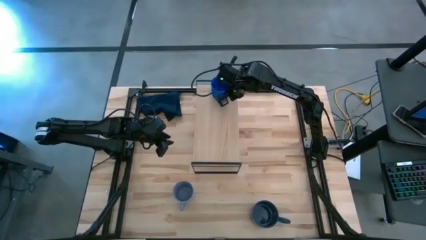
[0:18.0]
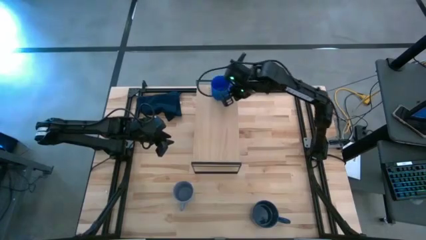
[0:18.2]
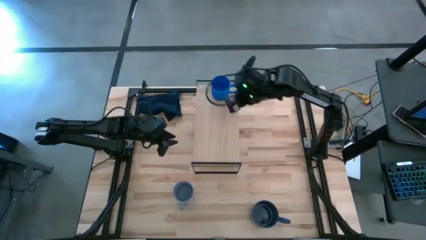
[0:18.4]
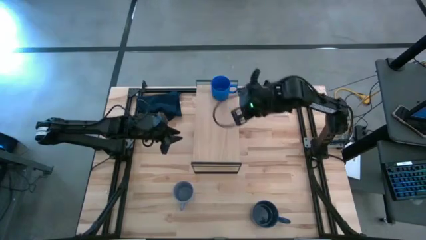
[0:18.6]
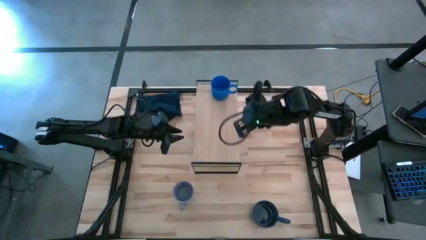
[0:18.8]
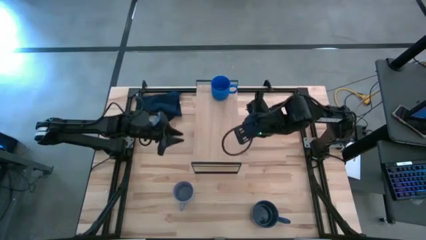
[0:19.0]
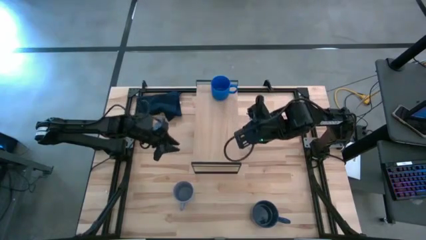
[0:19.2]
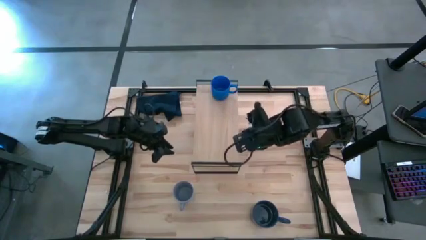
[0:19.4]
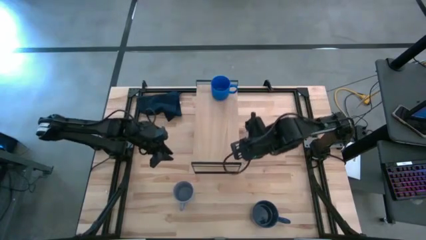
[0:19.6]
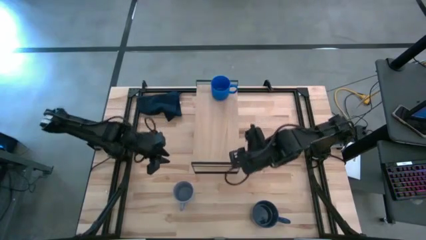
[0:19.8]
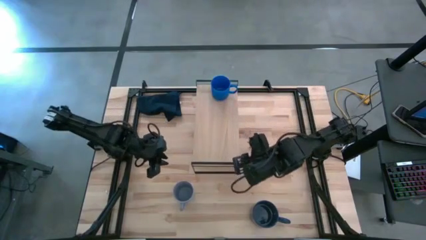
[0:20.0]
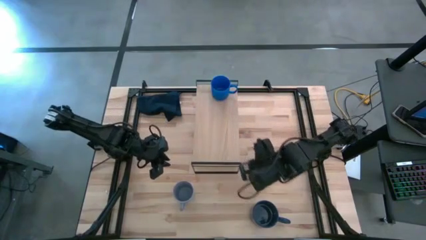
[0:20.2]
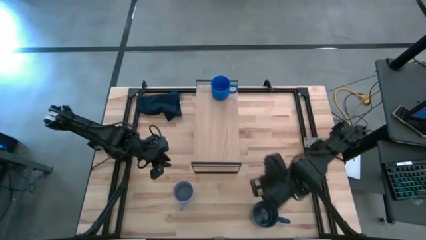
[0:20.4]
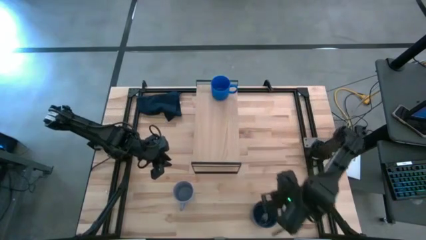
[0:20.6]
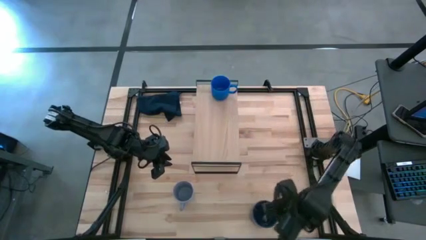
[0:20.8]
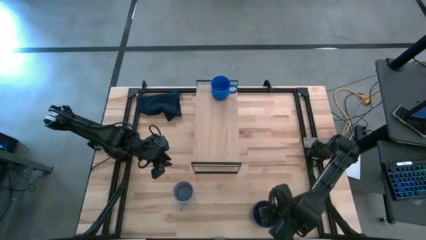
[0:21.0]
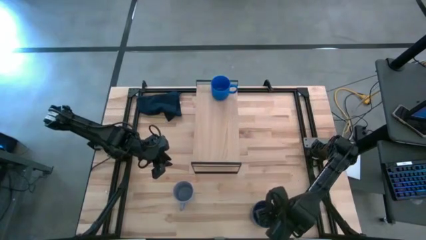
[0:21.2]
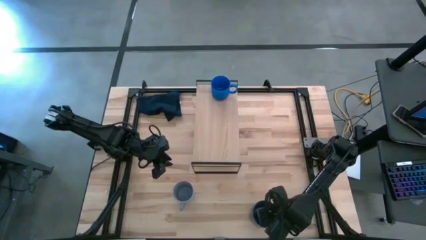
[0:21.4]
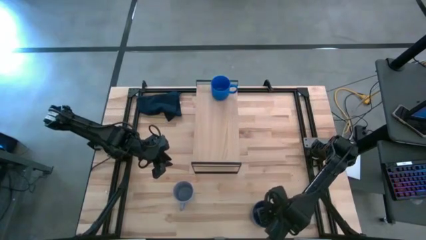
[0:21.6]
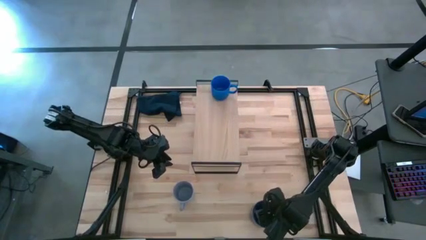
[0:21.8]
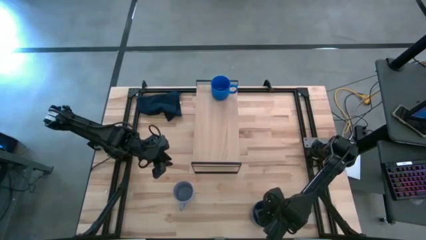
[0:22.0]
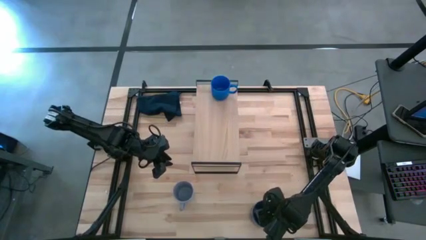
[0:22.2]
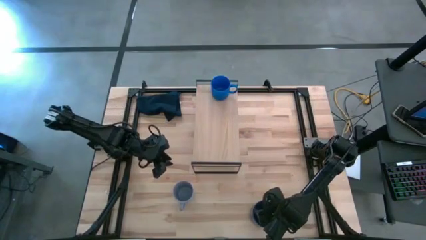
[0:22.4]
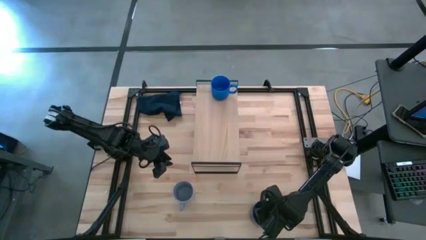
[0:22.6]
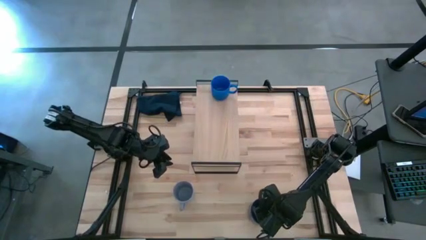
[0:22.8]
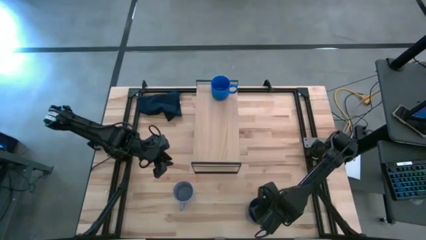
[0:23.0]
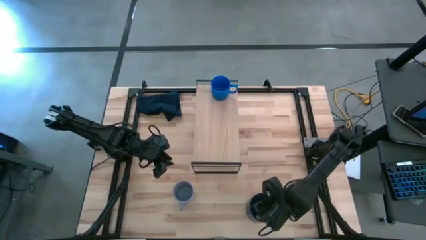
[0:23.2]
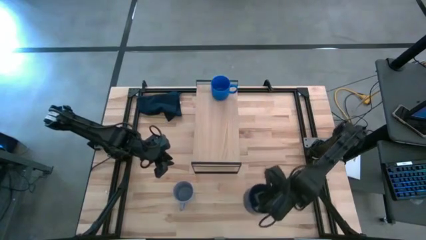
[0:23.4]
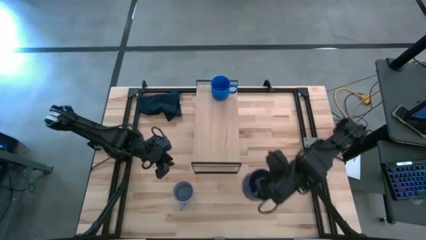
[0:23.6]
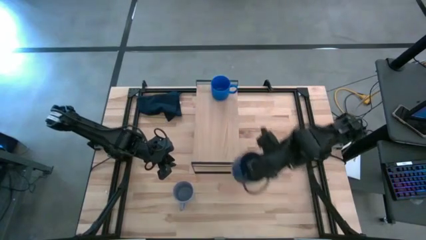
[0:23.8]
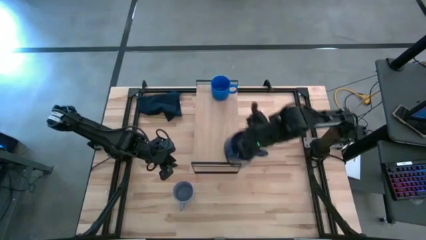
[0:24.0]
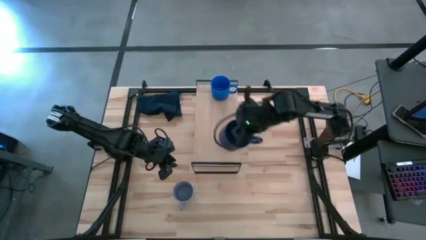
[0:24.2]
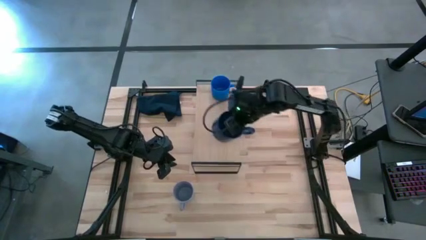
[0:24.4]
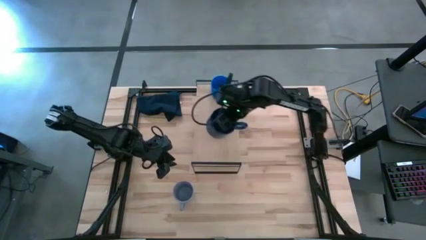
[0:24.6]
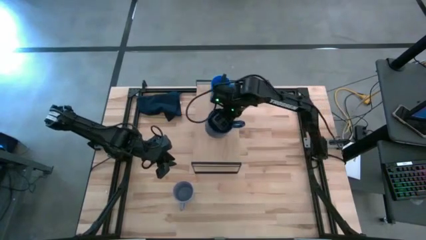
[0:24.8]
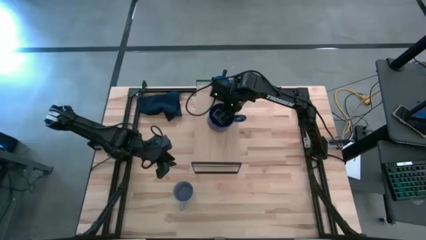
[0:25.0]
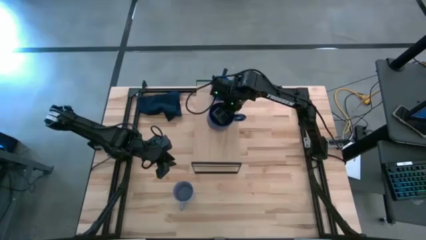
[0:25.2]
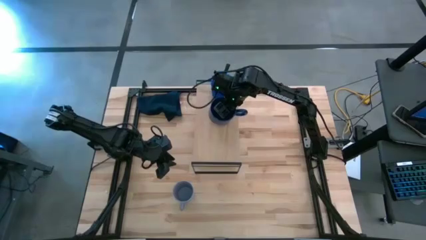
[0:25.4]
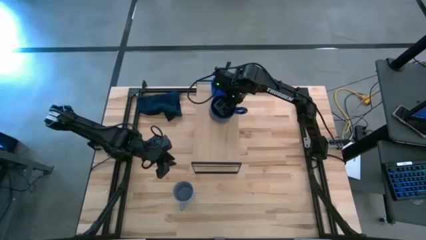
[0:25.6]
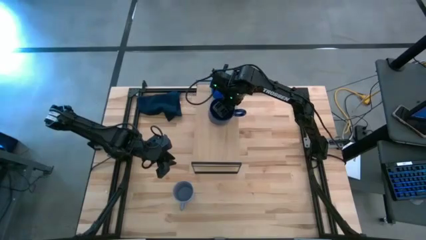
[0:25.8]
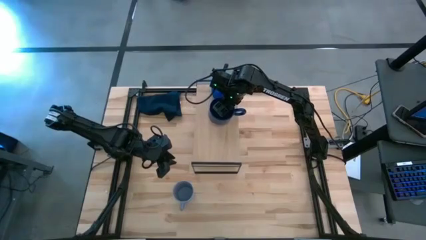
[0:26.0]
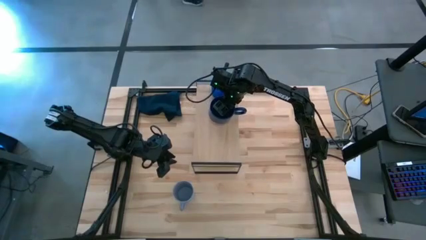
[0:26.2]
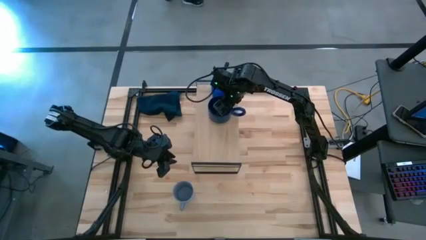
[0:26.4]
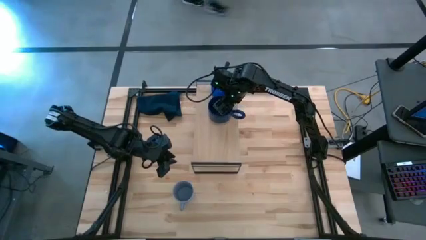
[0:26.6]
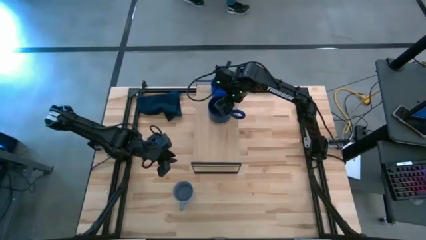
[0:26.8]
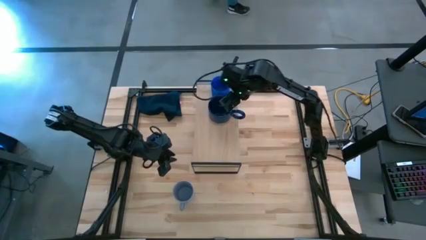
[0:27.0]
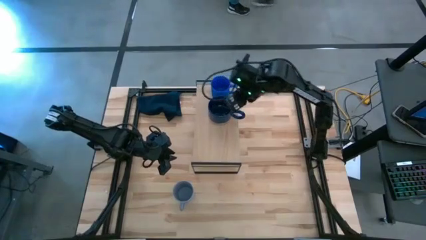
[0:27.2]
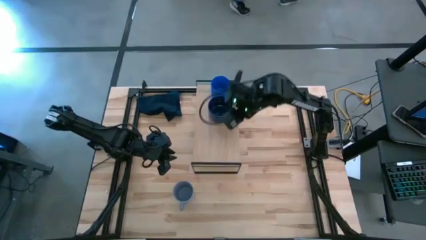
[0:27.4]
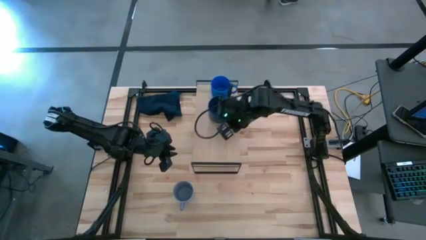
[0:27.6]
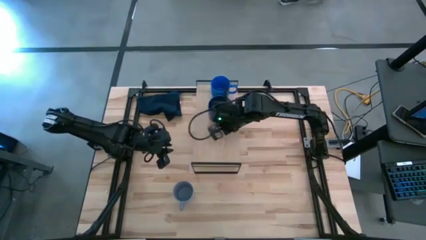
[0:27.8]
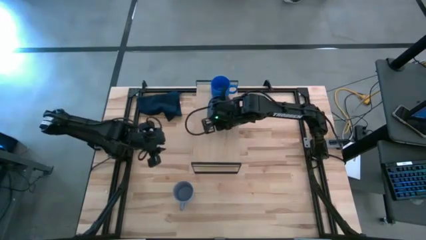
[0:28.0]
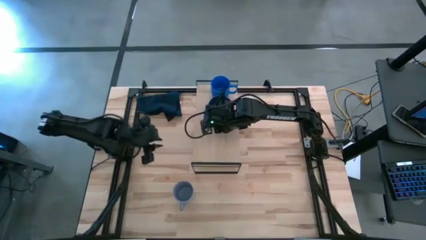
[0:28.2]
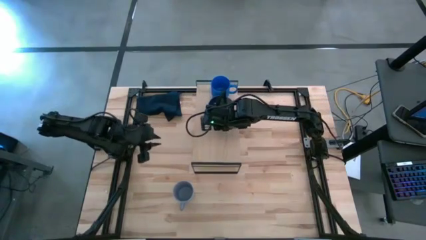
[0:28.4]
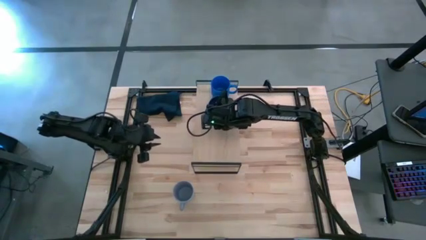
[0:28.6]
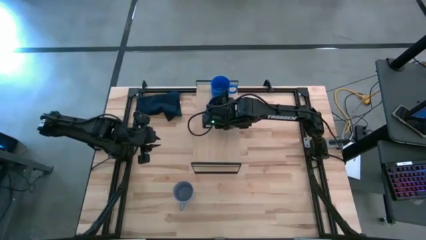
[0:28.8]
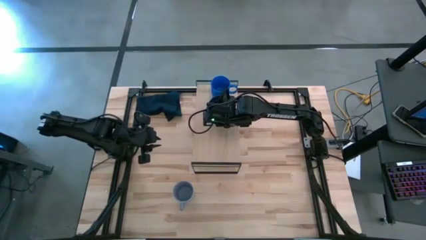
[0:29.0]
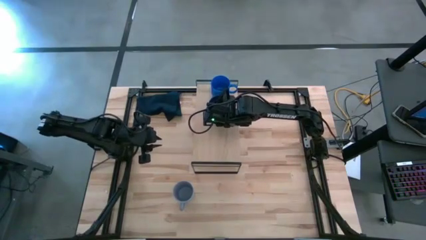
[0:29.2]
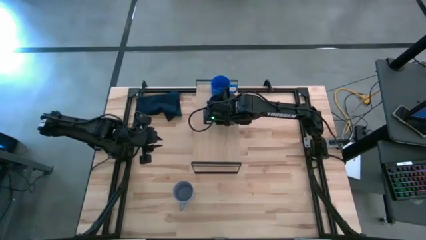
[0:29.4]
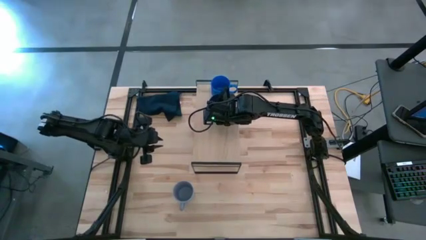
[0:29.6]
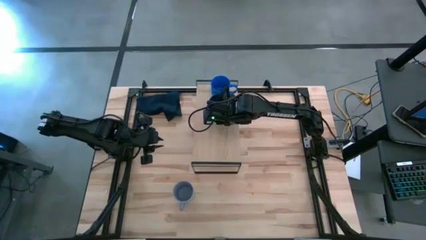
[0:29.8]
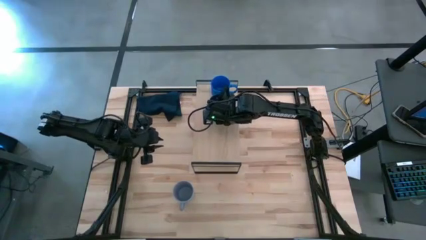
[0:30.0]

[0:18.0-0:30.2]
Task: Stack small to large cups/mugs on shelf
Put the blue mug on the shelf

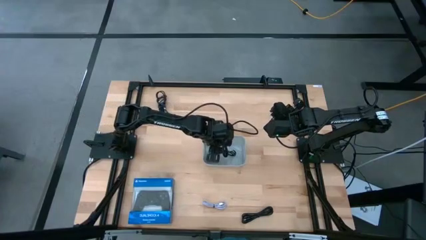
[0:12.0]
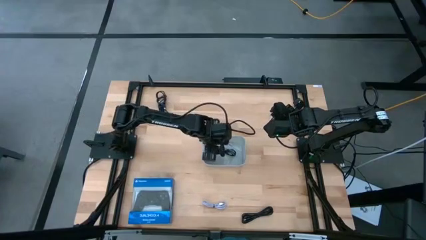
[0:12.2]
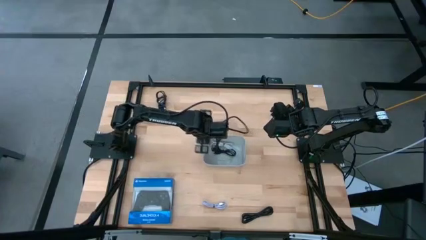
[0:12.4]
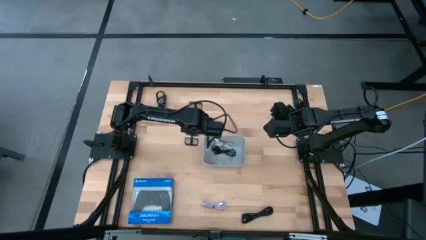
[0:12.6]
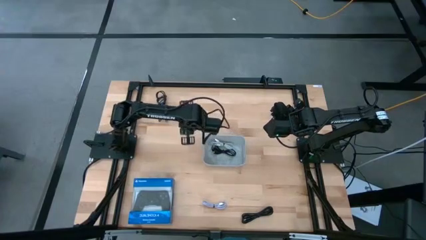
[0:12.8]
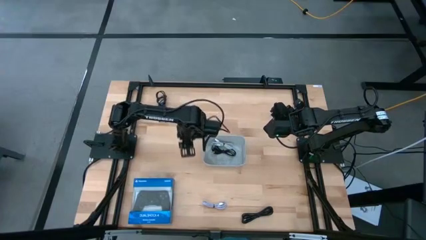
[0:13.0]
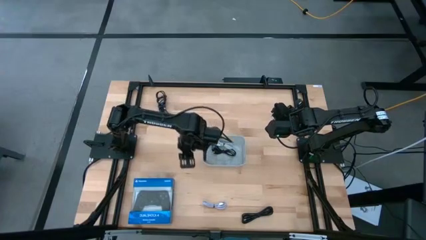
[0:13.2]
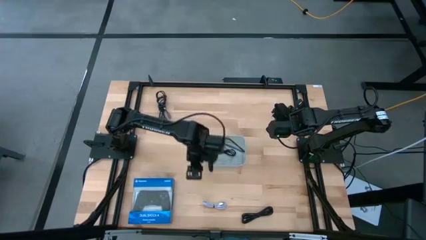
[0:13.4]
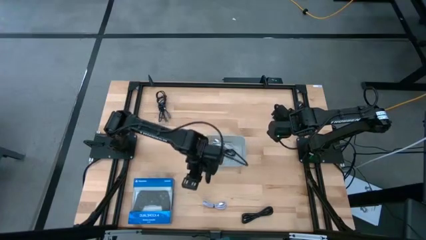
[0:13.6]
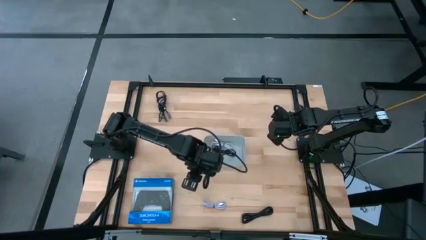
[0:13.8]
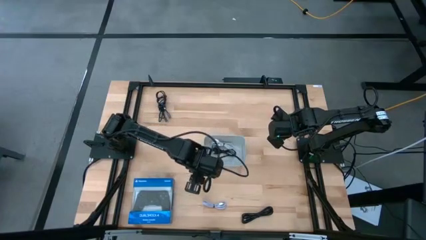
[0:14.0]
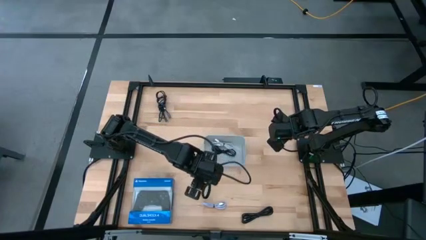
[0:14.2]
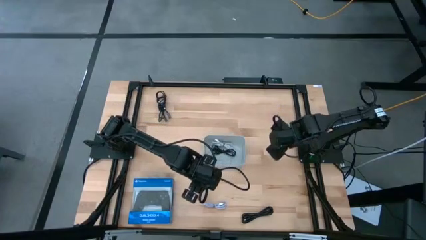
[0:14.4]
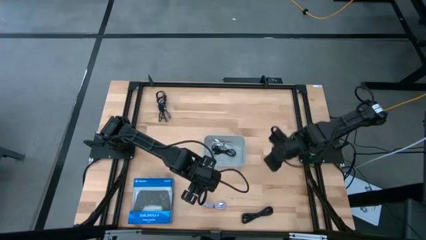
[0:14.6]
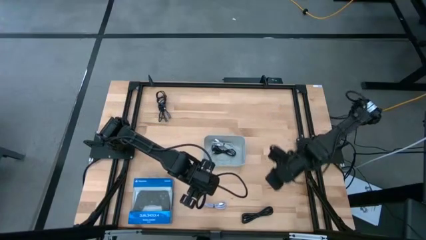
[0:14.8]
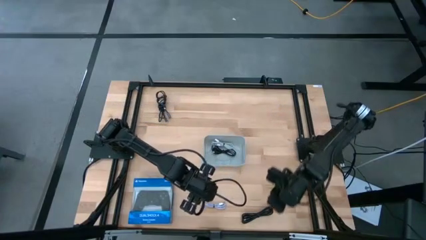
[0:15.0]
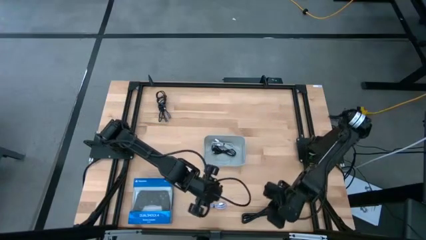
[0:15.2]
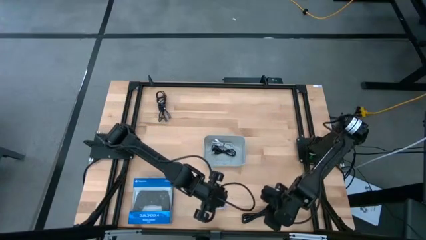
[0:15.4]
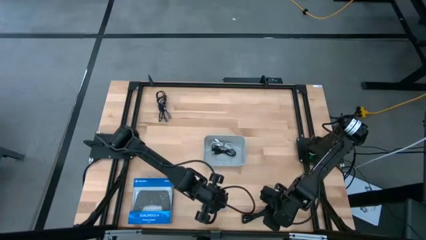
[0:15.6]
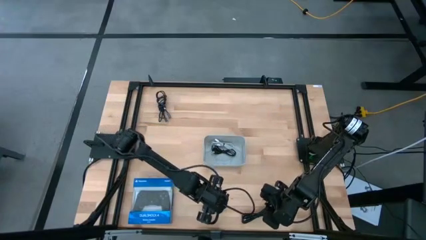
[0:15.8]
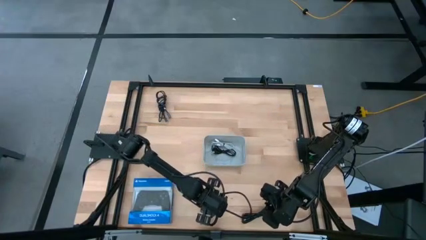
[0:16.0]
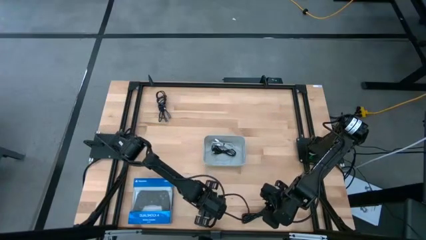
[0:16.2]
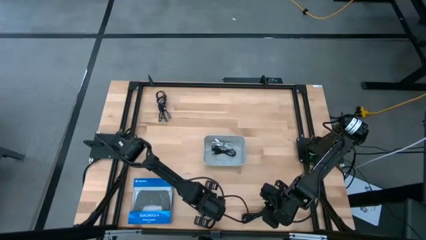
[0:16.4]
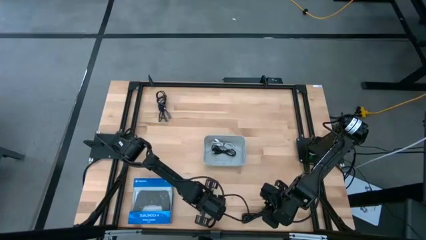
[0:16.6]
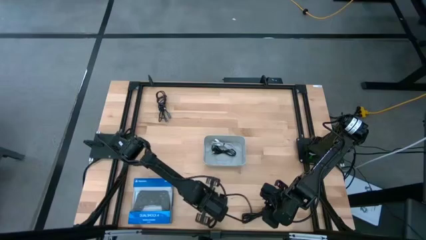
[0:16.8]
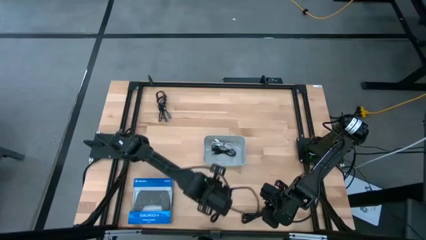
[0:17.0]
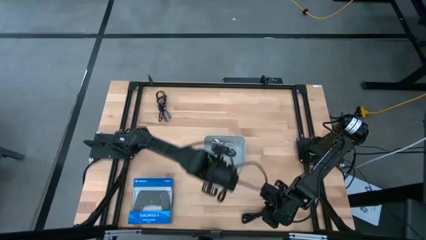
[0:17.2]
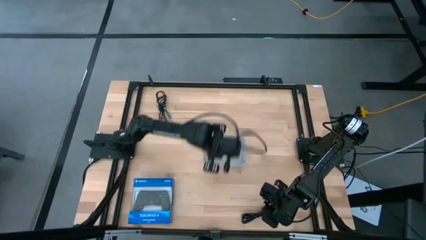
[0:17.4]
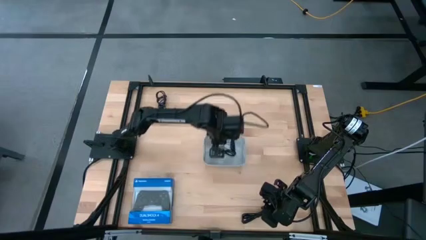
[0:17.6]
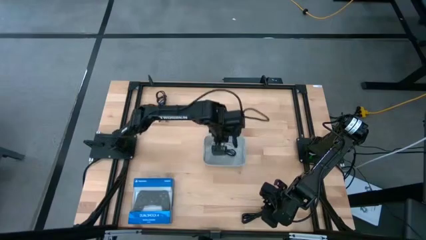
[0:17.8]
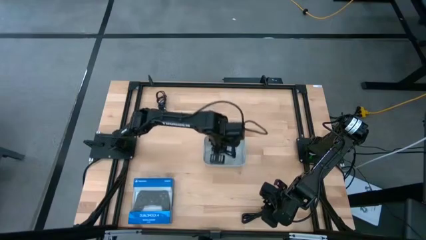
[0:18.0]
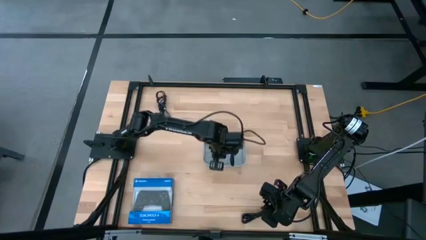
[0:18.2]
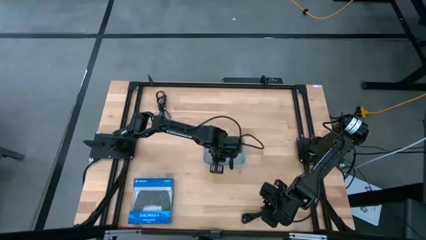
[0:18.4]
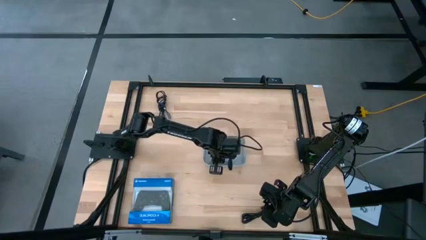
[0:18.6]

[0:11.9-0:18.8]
Task: Pick and place USB-C Cables
Put the purple charger cable into the gray bin
